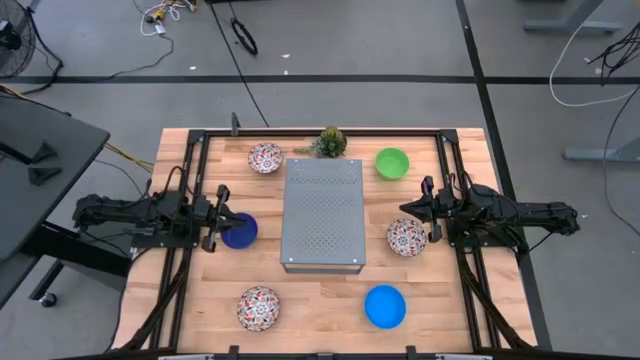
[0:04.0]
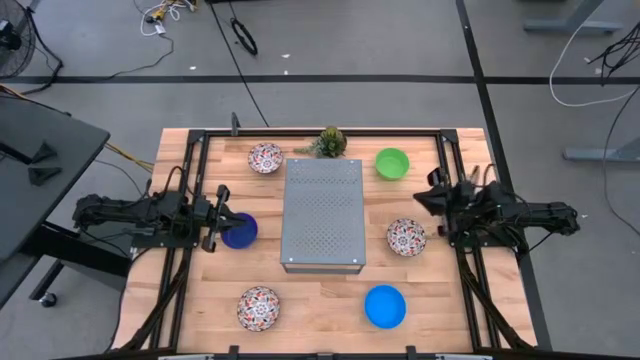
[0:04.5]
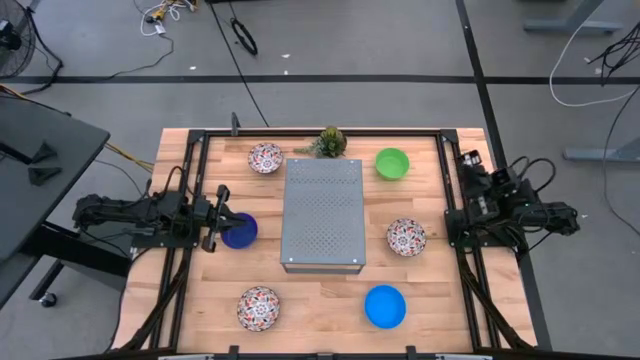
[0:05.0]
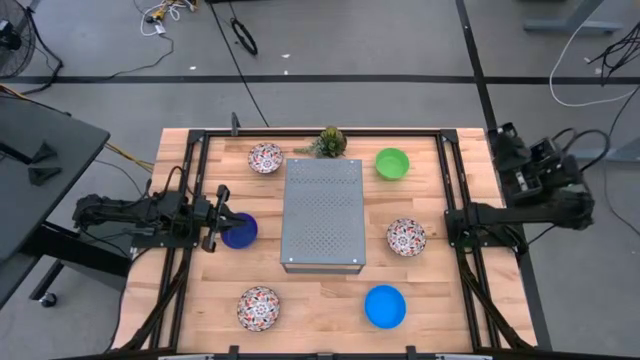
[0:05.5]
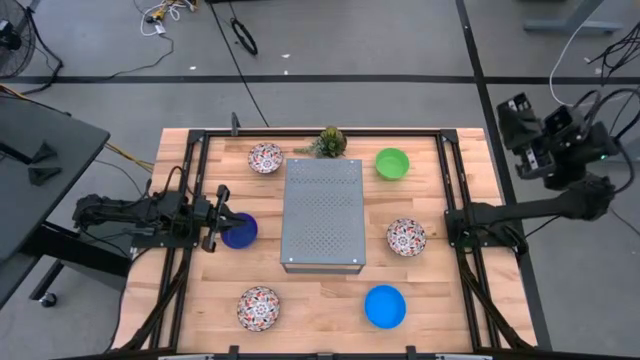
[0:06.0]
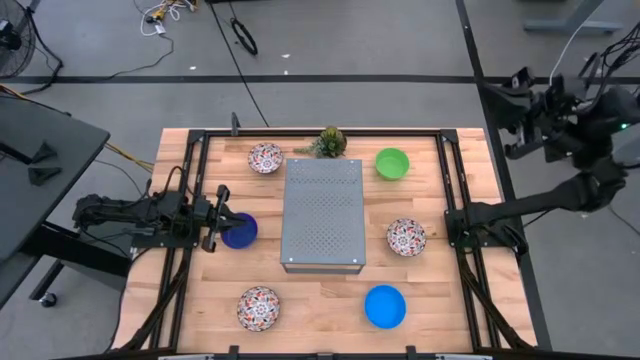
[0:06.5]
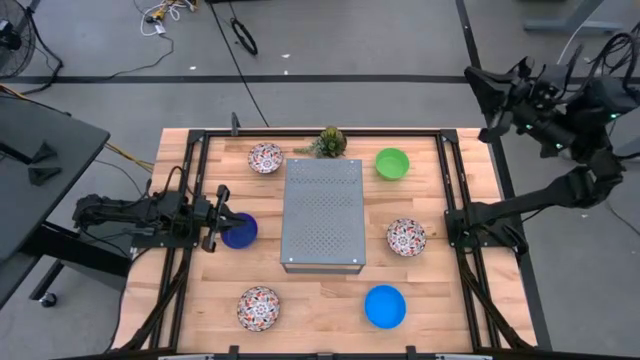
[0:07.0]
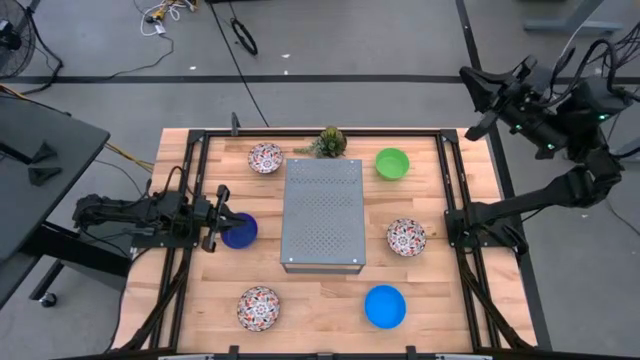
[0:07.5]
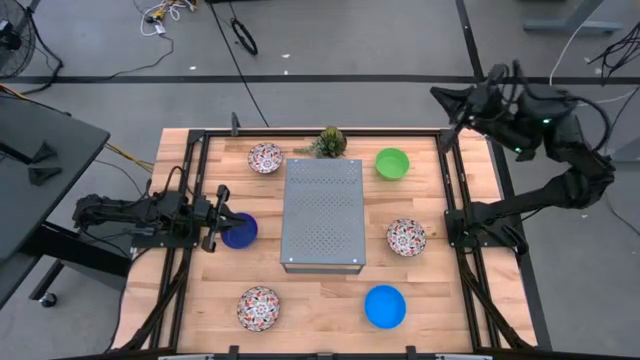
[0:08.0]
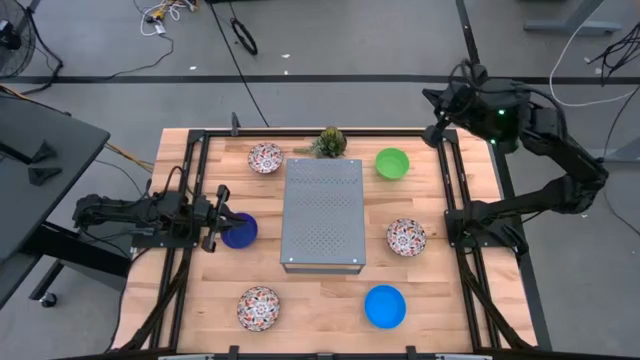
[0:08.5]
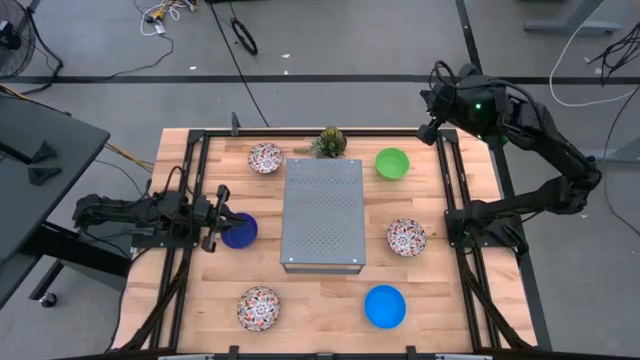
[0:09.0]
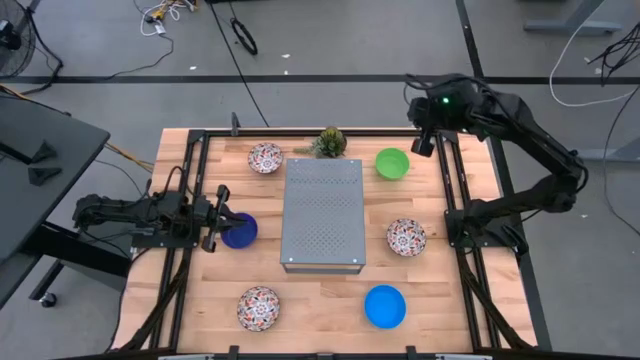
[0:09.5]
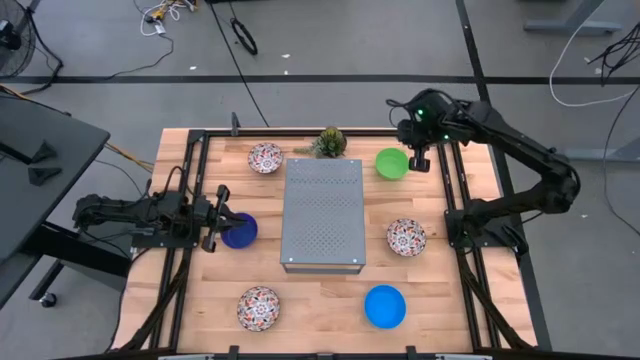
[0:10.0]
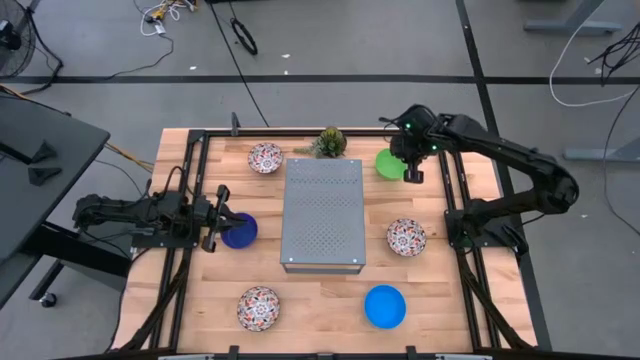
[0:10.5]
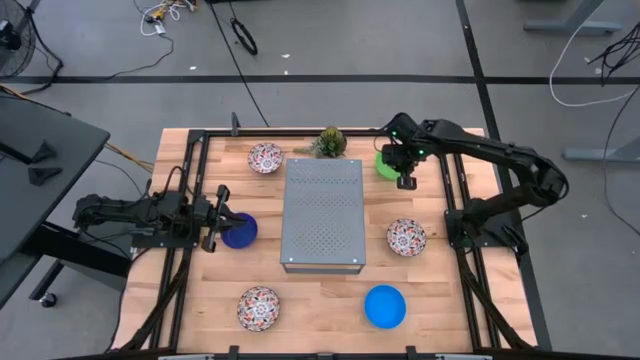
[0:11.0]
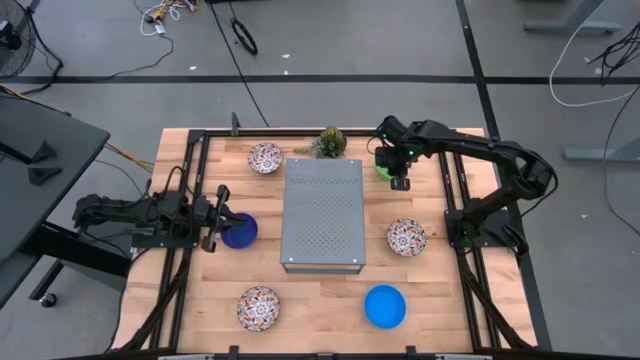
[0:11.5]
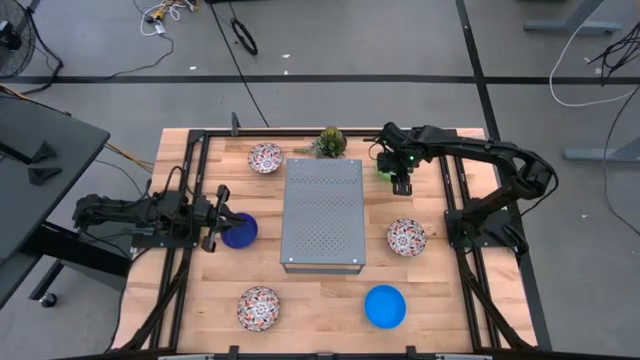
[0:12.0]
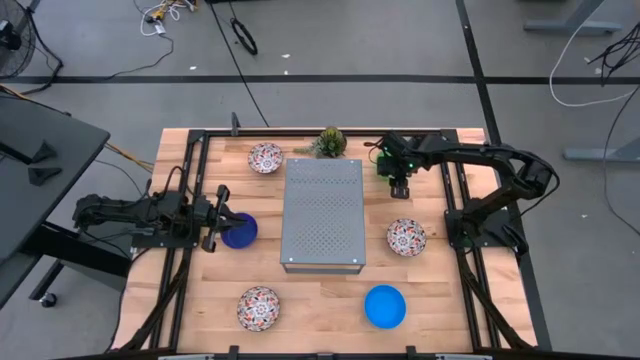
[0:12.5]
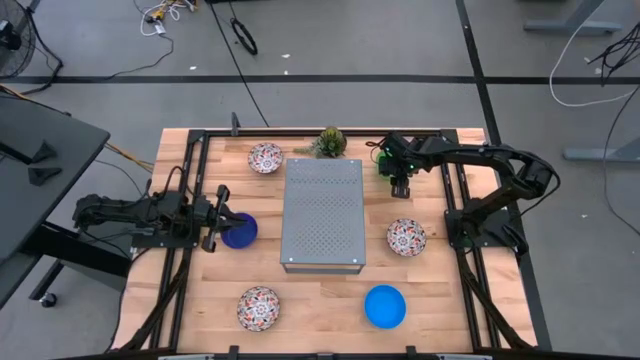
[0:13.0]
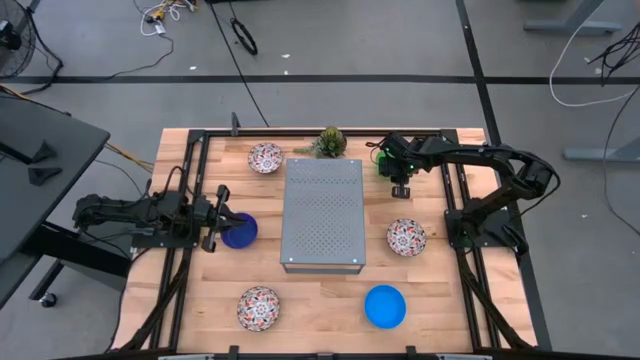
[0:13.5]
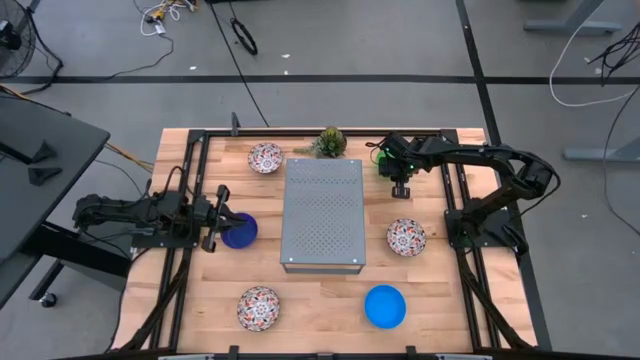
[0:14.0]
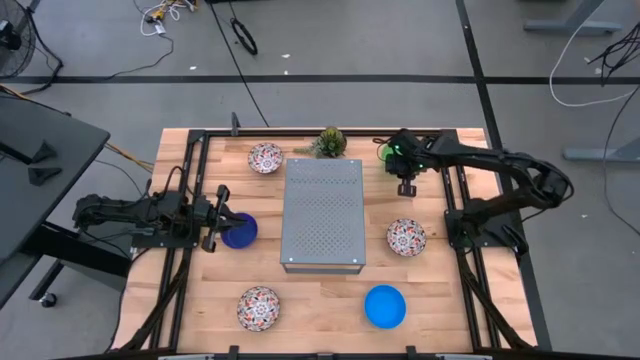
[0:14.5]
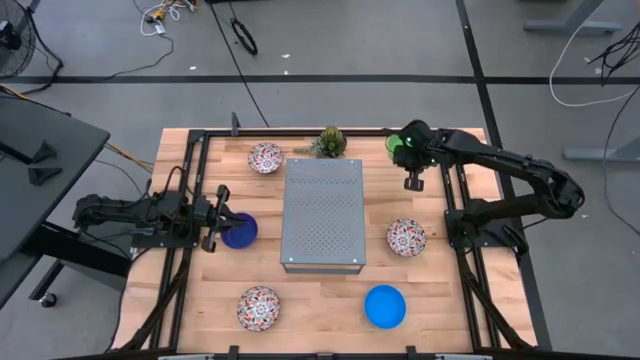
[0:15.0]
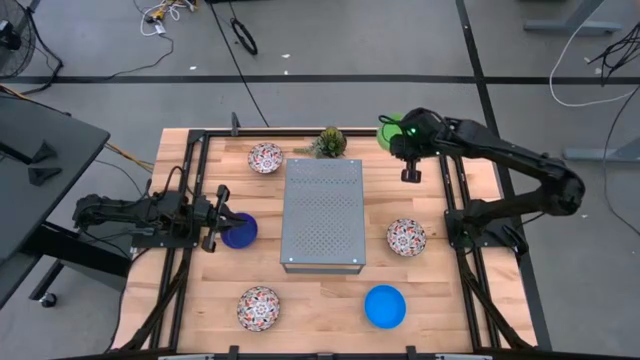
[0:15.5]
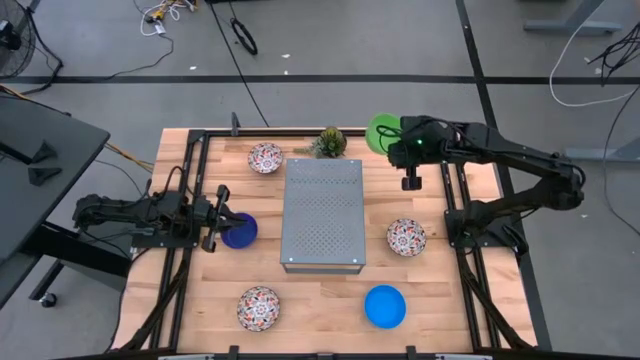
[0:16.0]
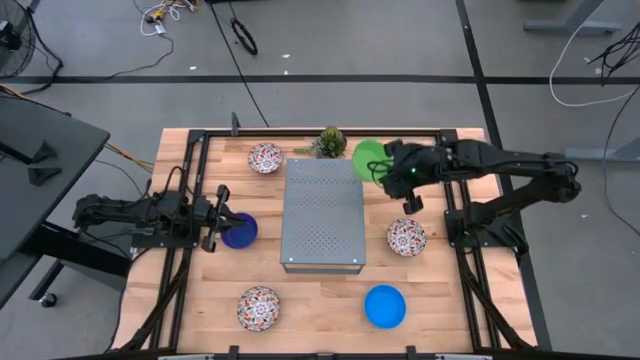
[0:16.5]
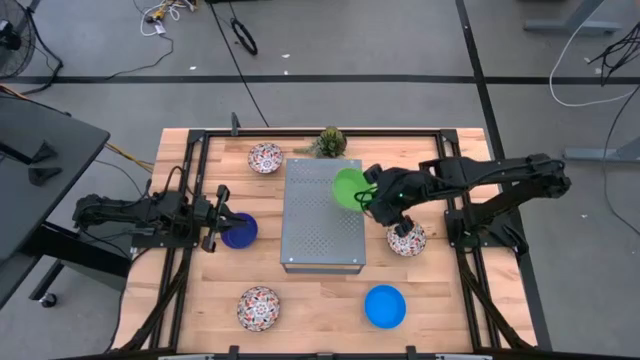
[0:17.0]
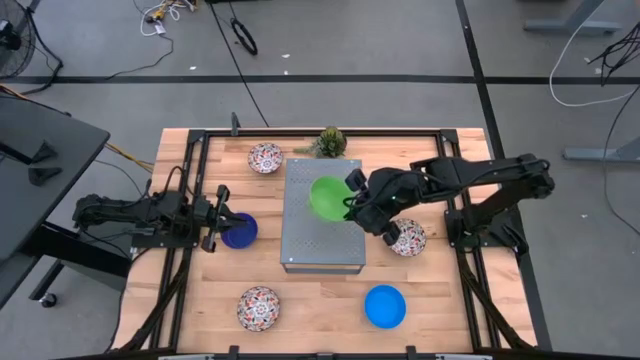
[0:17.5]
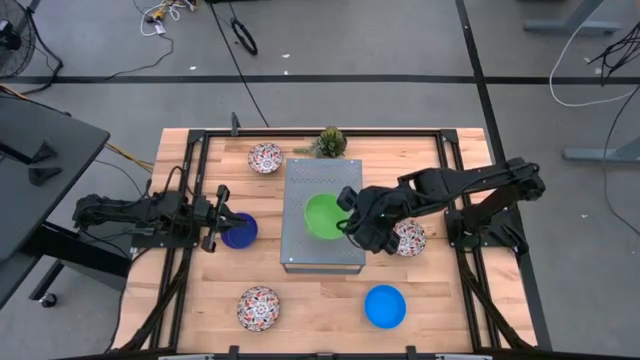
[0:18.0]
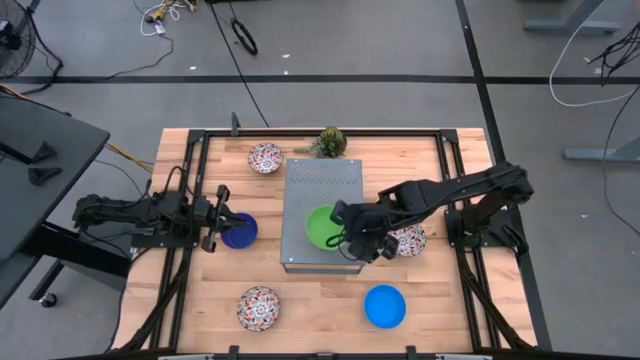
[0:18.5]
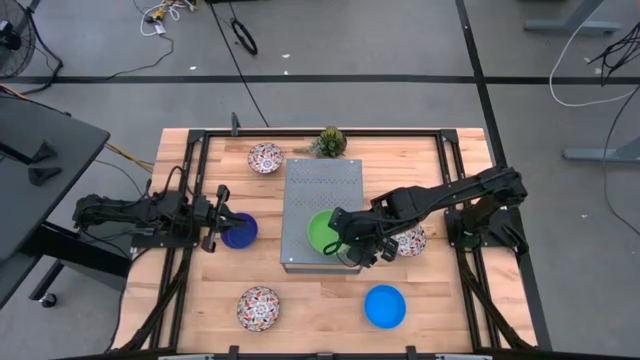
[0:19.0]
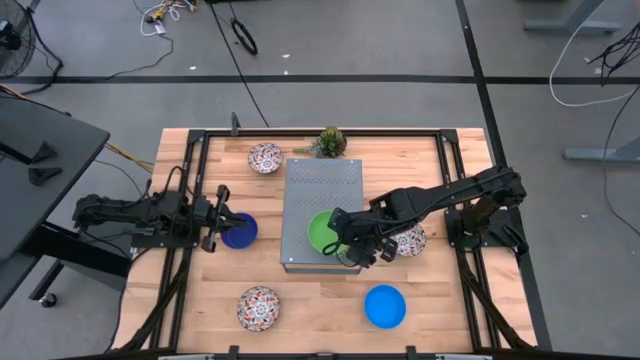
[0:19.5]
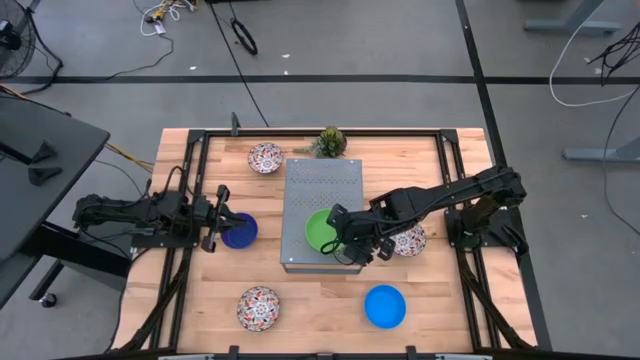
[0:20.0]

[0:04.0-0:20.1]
Task: Pick & Place Mini bowls
Put the green bowl on the shelf

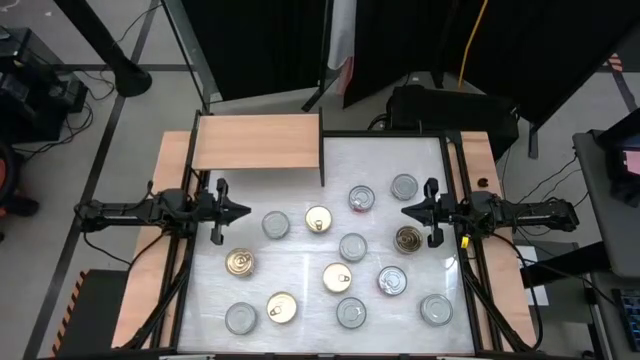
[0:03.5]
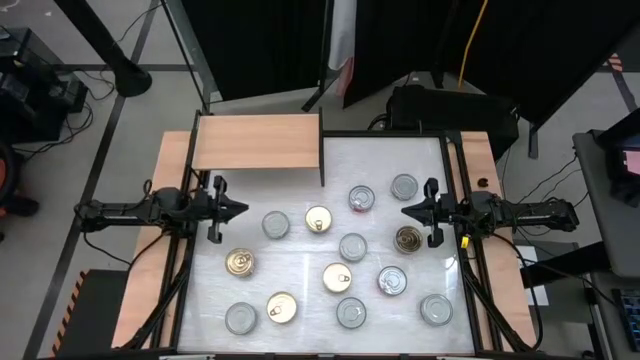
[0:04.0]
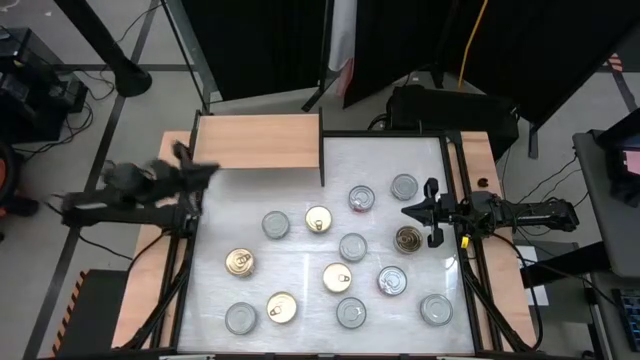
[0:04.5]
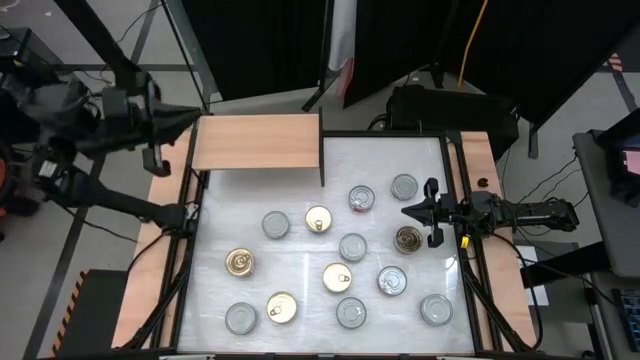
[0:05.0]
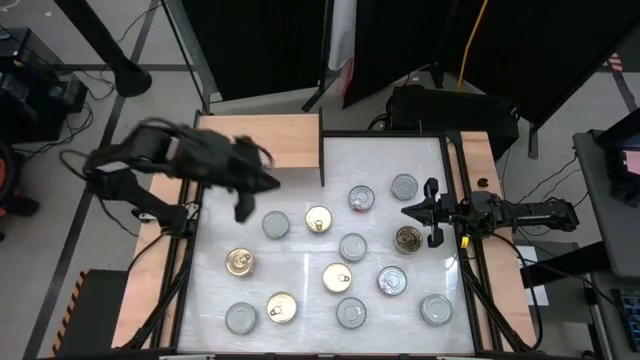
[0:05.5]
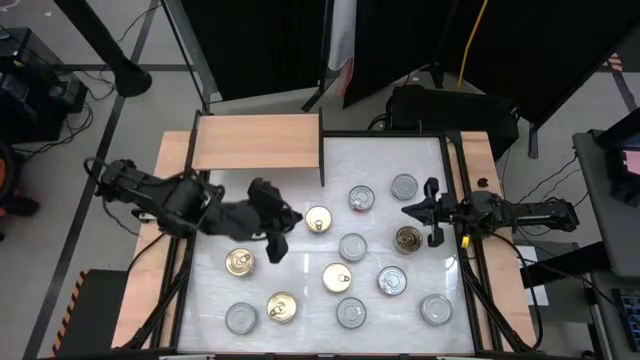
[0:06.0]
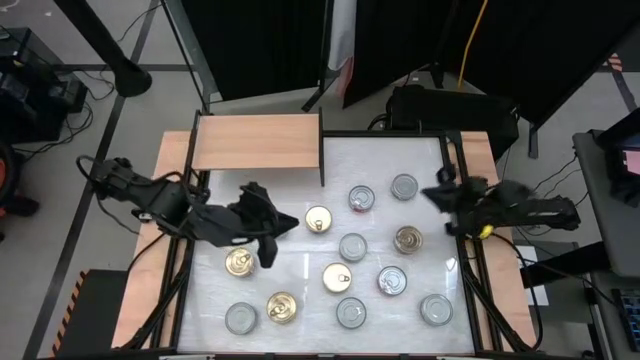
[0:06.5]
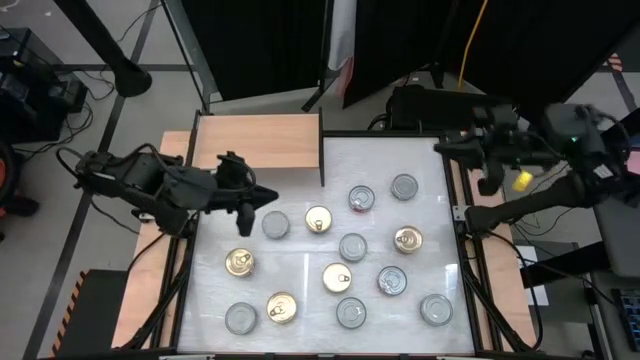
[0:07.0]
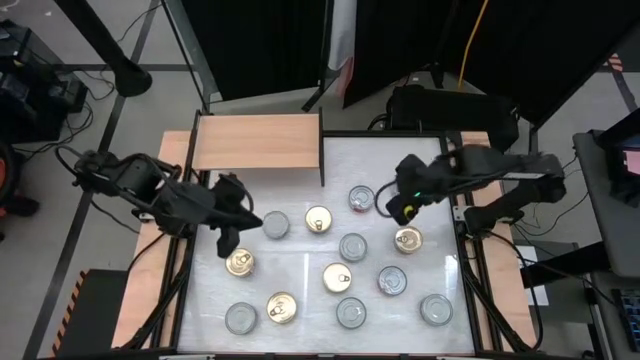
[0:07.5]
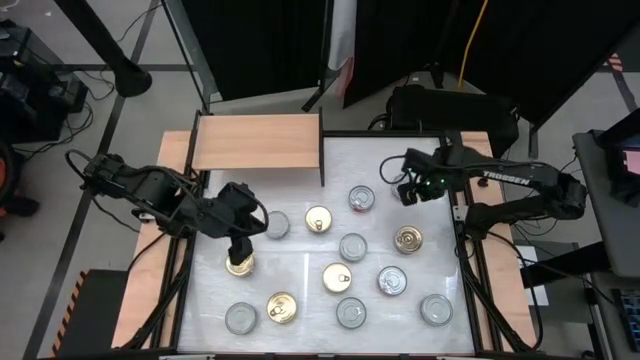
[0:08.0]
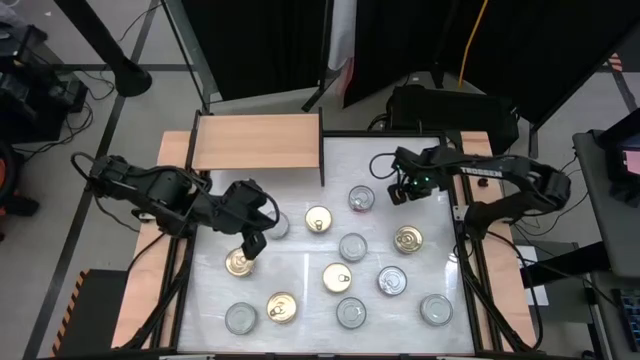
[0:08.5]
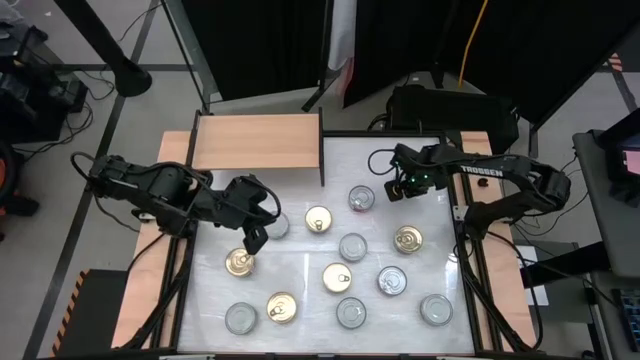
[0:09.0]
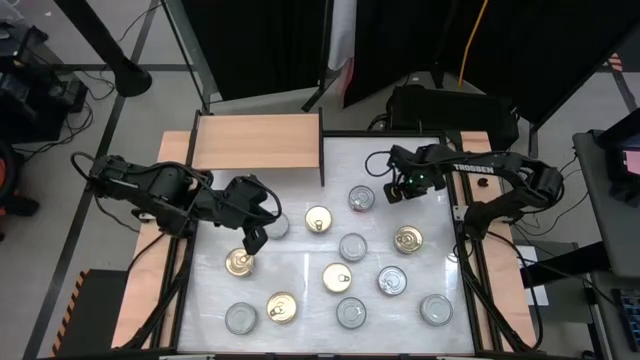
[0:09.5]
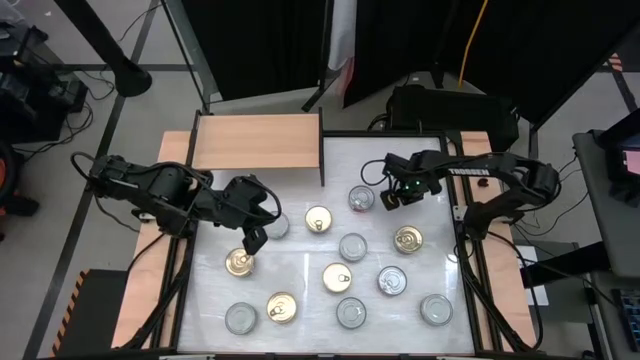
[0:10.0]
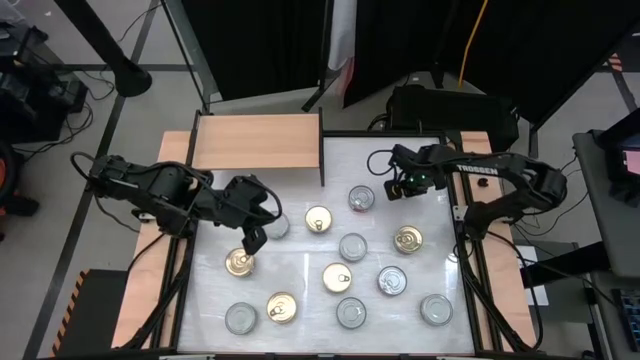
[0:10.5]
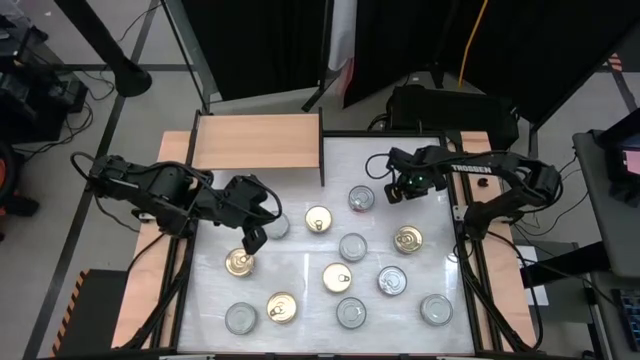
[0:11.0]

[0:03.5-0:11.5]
Task: Stack canned seafood by type on shelf
Put the green white tuna can on the shelf
